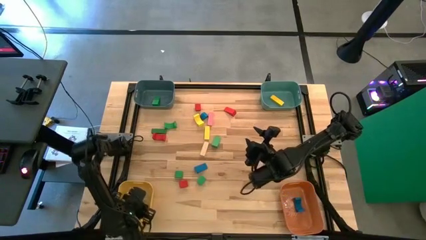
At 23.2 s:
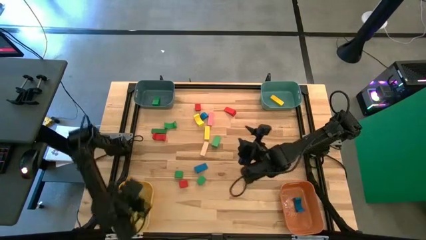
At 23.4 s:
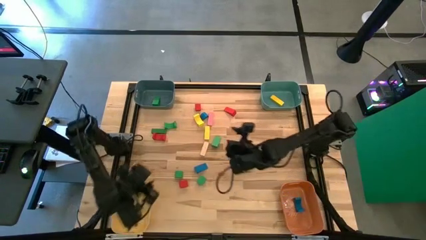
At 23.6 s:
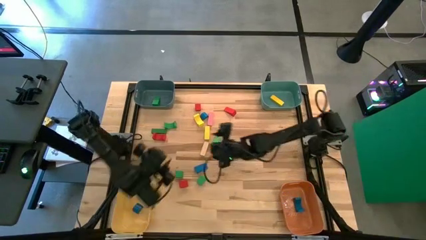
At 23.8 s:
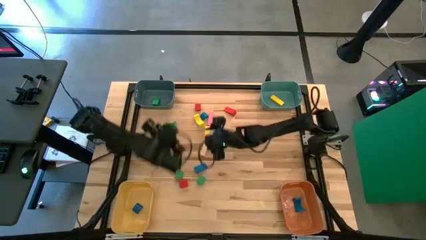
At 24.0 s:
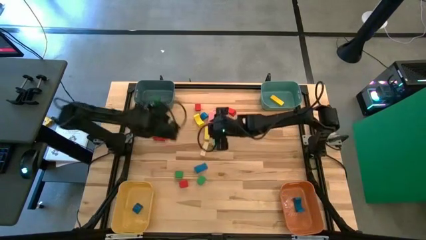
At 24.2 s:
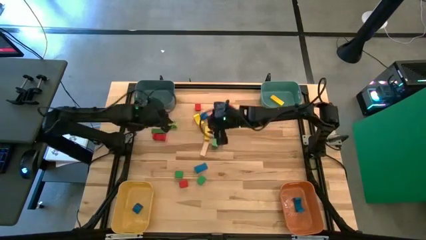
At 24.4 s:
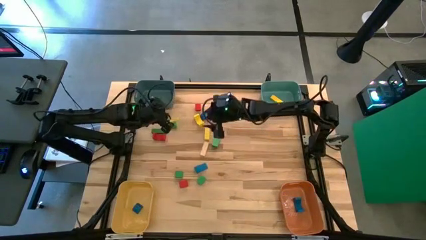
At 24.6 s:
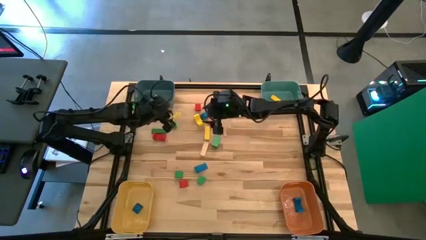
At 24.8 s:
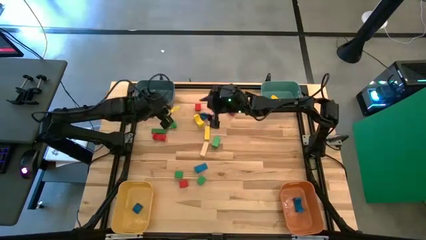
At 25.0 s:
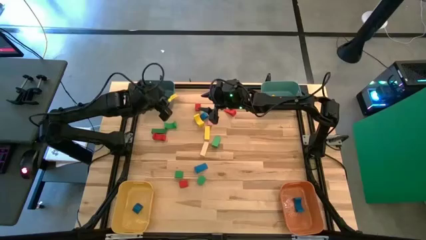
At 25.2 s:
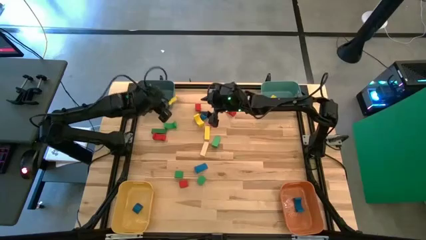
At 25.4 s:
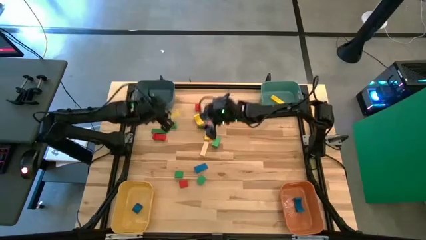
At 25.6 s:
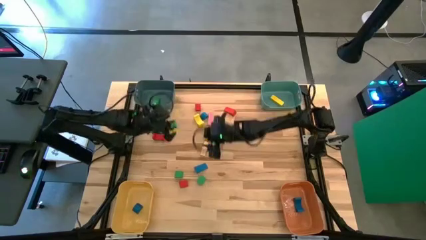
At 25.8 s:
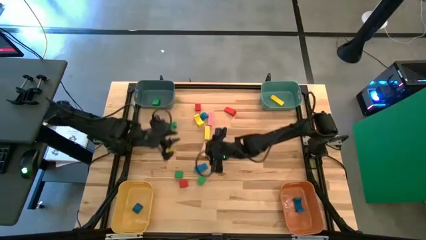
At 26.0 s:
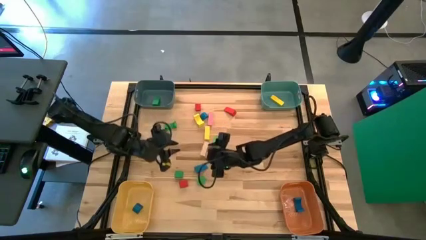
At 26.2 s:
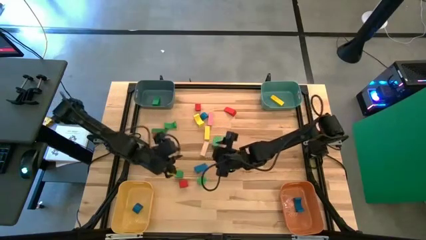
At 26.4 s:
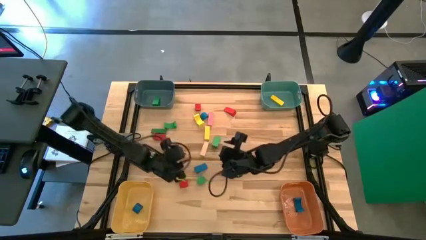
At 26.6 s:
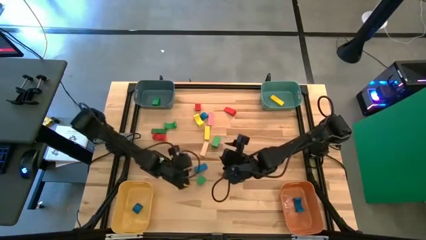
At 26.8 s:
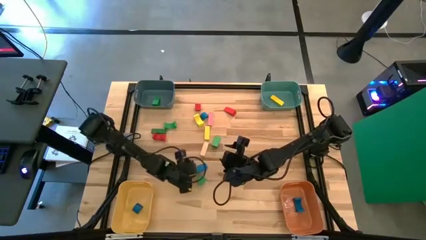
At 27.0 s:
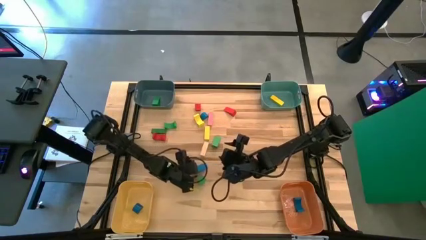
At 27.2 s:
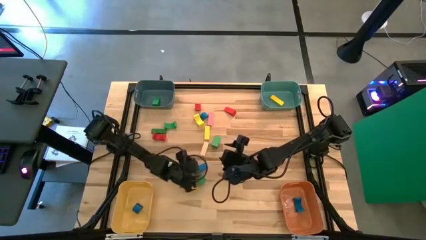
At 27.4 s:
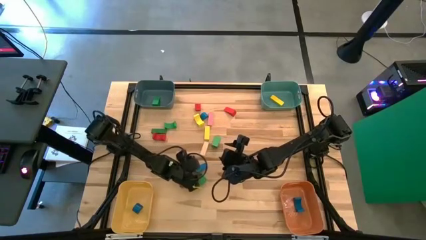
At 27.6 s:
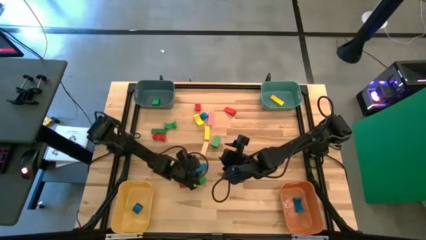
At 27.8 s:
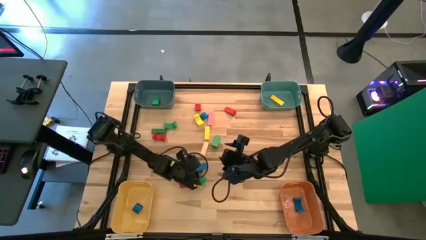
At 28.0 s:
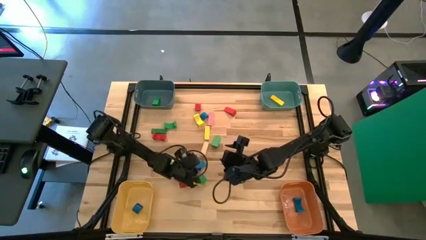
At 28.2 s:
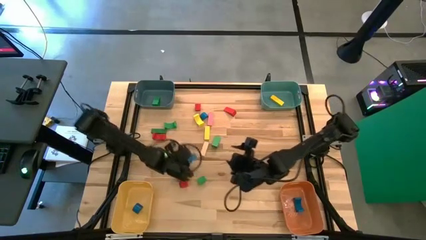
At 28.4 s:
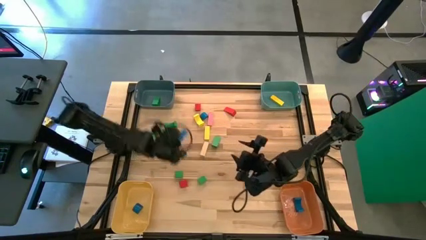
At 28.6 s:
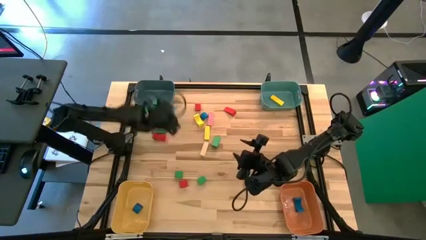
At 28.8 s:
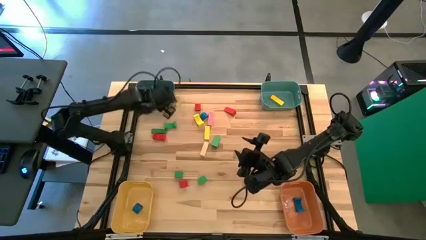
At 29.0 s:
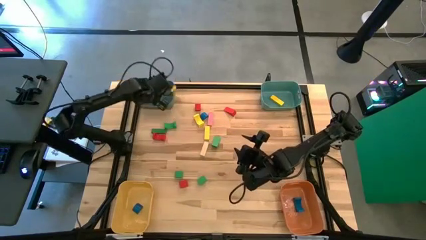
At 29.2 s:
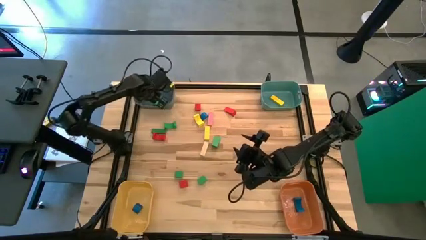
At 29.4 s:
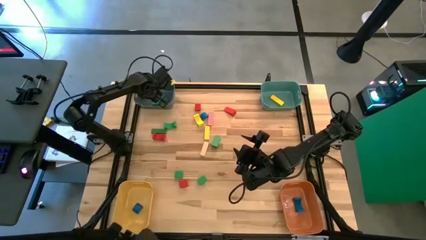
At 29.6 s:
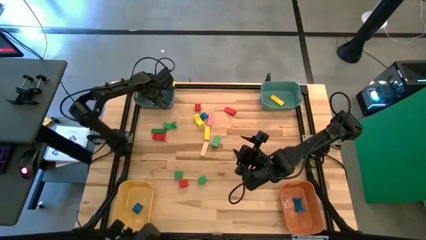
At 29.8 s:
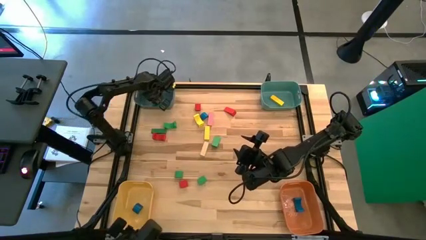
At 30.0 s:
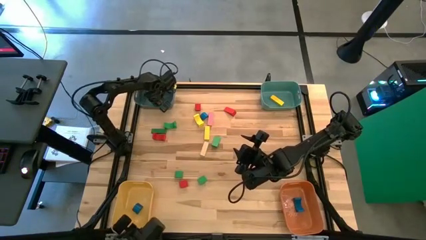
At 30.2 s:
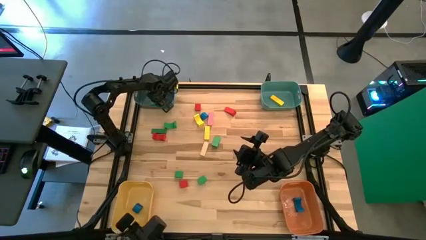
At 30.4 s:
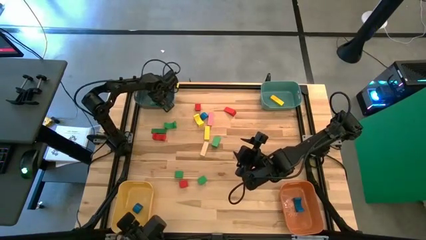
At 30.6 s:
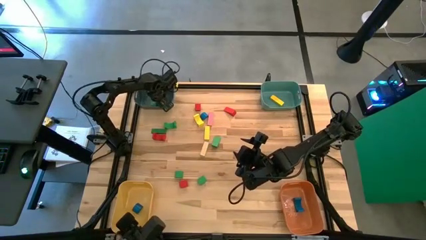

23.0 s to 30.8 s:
Task: Sort blocks by size
Put the blue triangular block into the blue bin

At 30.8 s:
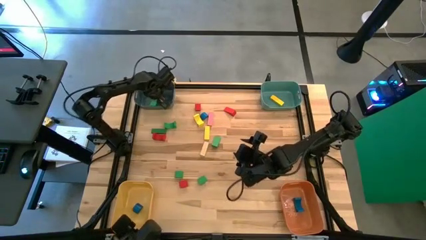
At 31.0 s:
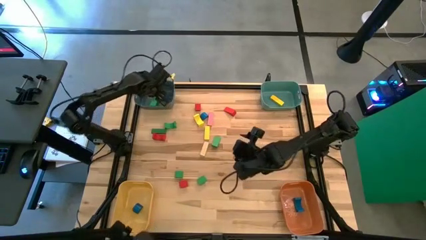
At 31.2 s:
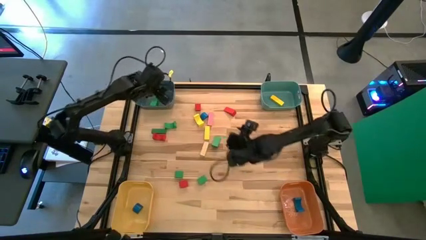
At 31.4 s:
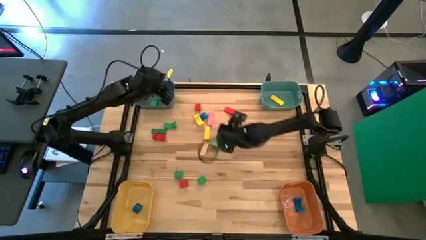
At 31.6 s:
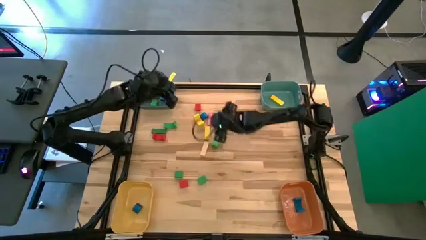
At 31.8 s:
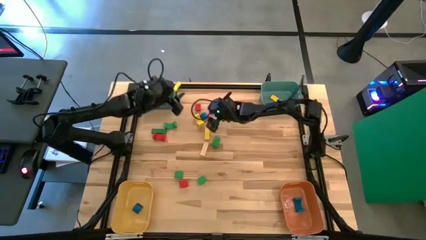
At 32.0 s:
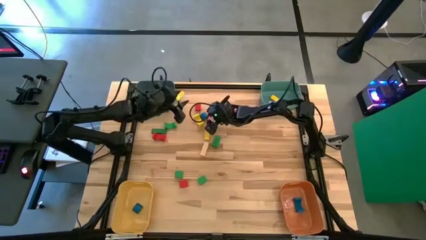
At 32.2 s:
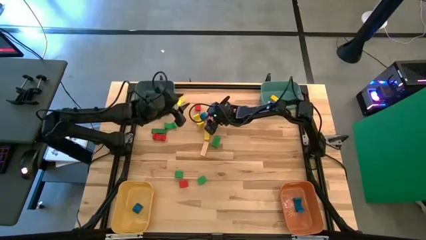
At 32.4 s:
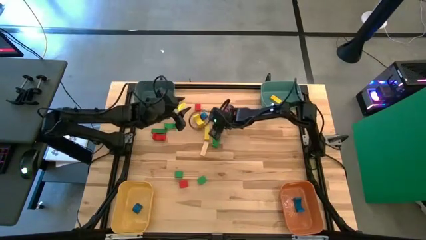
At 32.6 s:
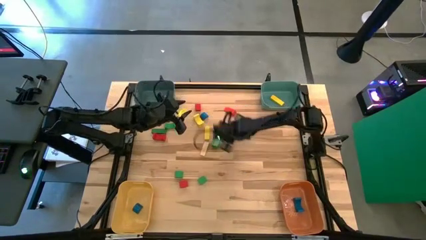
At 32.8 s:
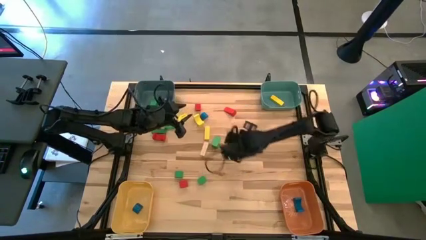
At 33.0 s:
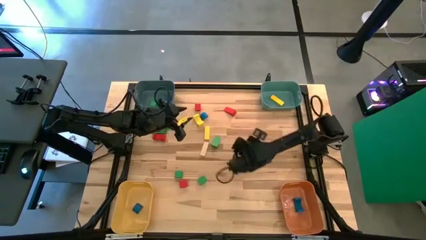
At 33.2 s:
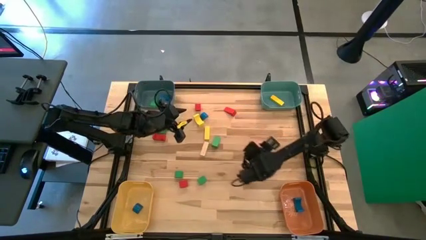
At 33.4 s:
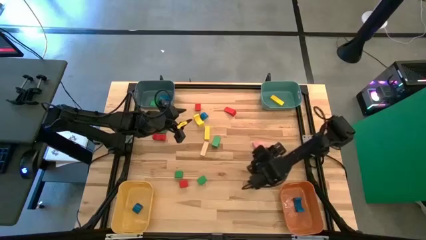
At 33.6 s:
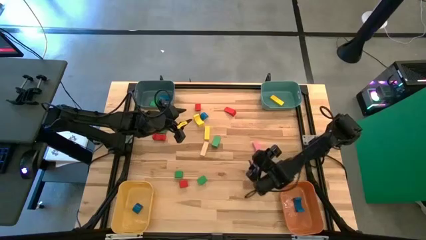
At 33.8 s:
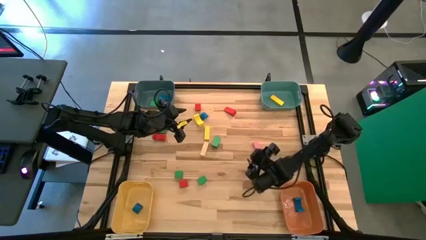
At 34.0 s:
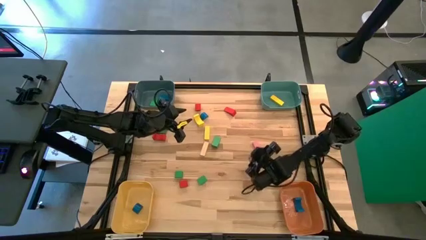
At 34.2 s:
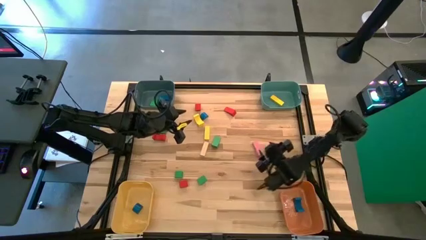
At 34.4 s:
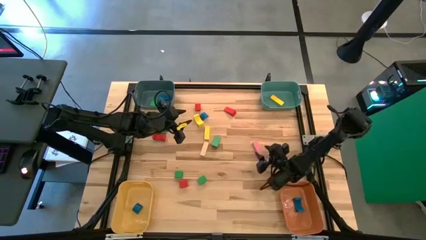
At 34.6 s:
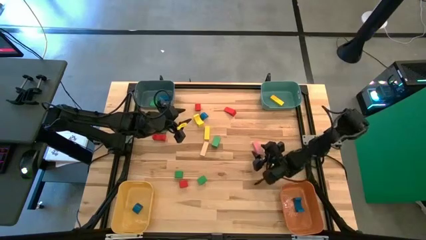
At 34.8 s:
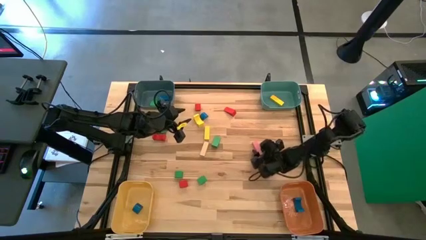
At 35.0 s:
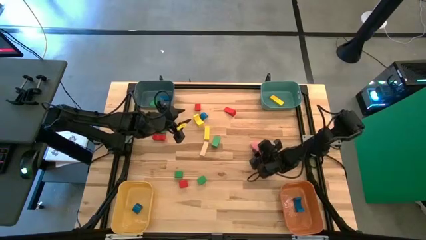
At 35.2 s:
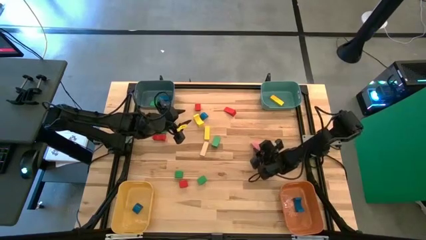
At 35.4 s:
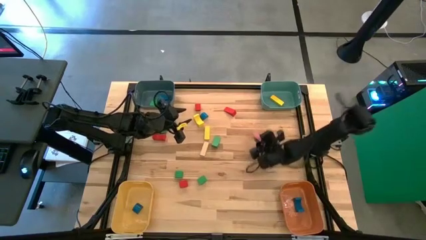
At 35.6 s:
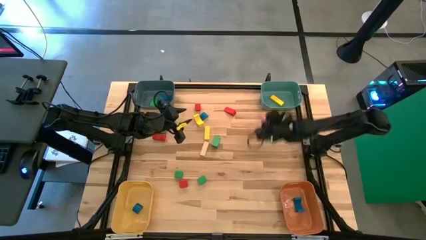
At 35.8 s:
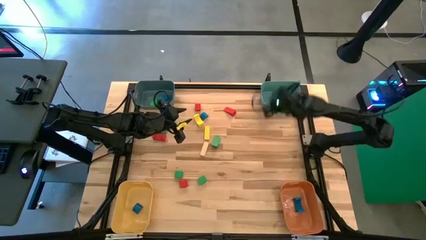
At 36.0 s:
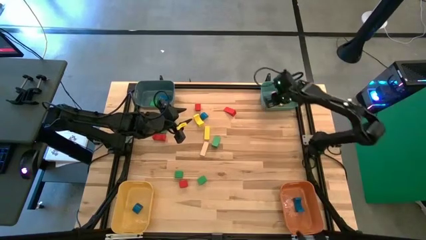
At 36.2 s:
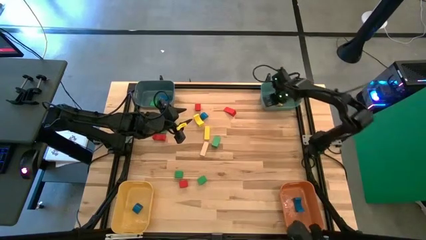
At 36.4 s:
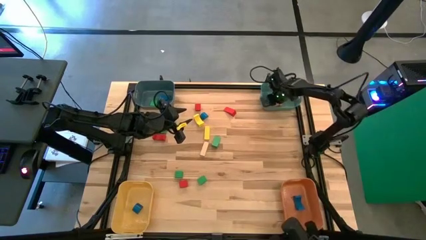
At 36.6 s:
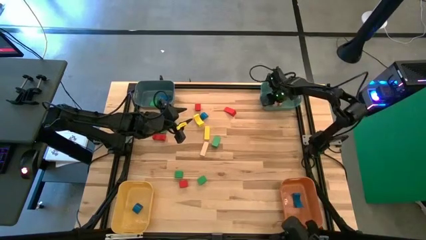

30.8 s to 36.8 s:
Put the pink rectangular block into the green bin

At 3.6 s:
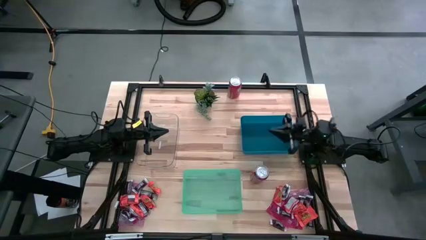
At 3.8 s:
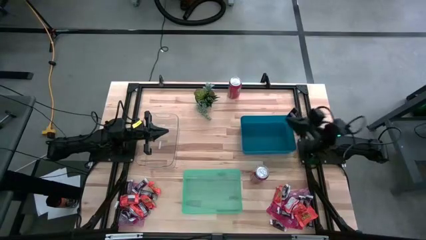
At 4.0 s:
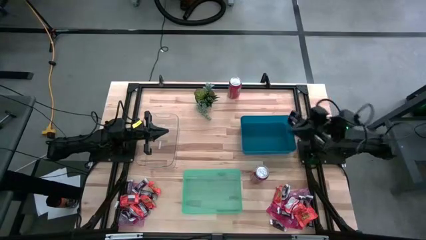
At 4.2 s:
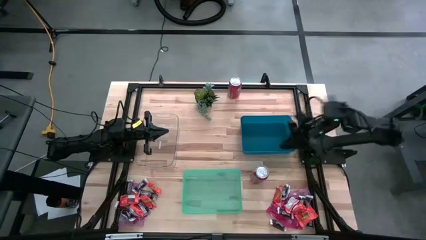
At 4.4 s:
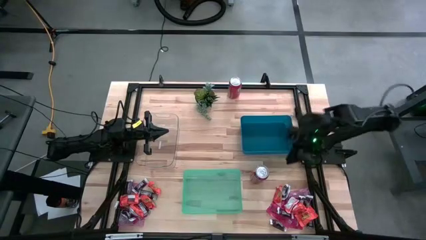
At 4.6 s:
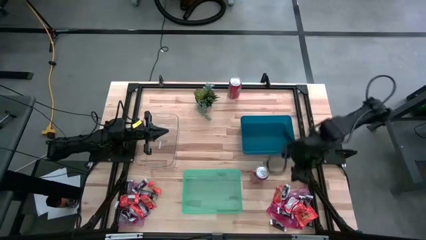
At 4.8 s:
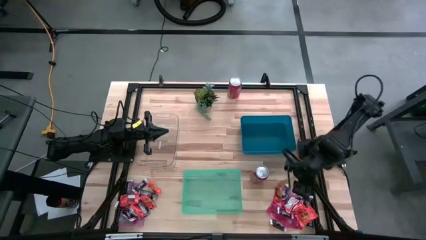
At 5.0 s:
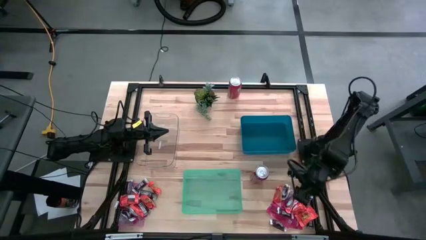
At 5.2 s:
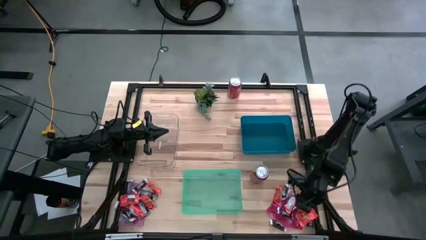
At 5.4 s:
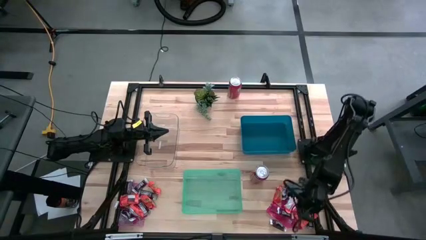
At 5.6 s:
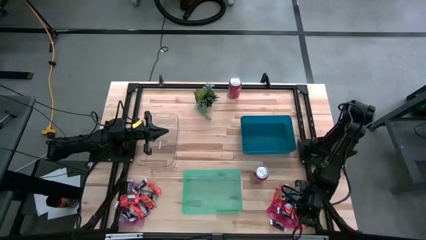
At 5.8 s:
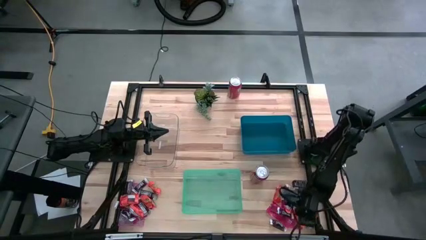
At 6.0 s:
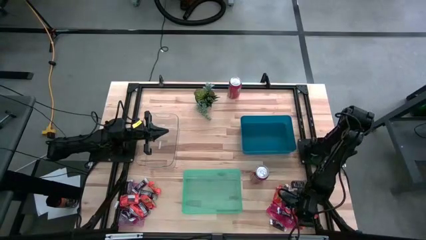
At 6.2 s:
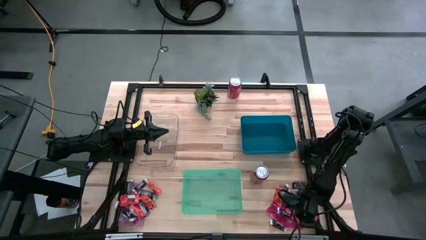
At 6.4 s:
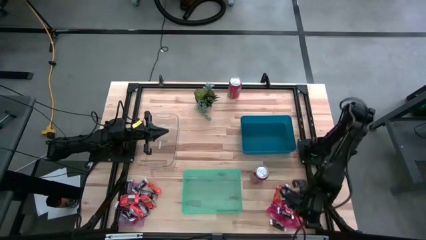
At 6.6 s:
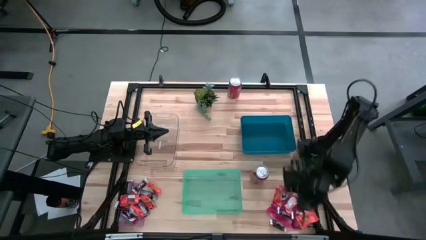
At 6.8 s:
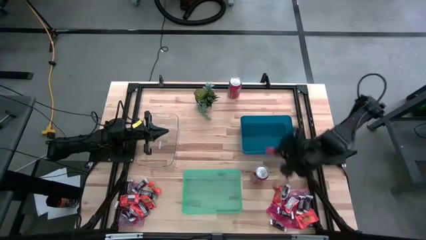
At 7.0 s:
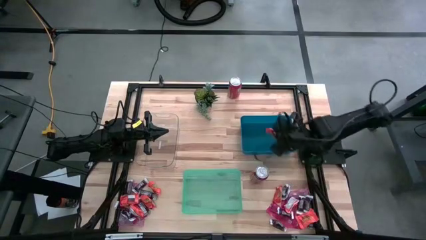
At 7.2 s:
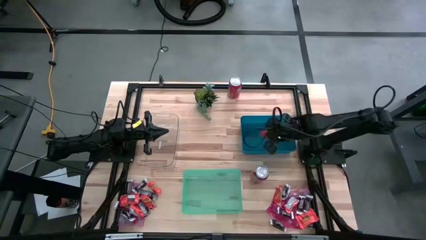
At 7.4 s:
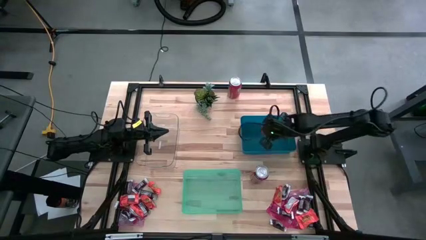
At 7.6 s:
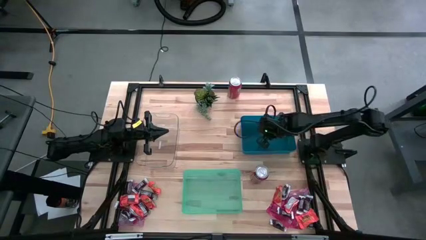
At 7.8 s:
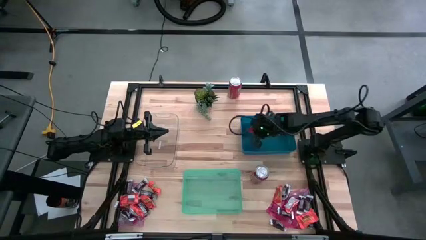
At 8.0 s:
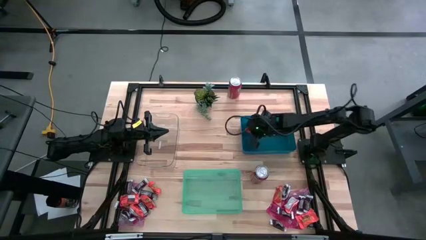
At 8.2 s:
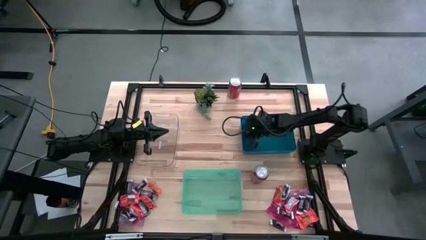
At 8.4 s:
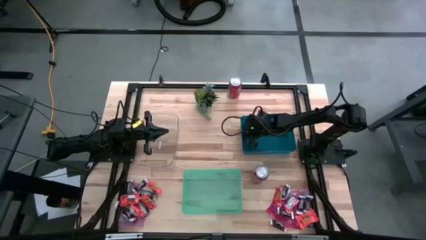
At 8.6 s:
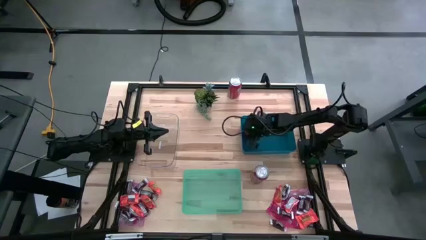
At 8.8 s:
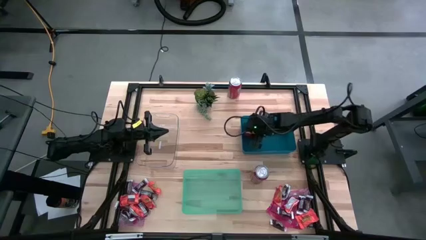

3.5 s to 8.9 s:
Task: Sort candy
Put the orange chocolate into the blue bin
